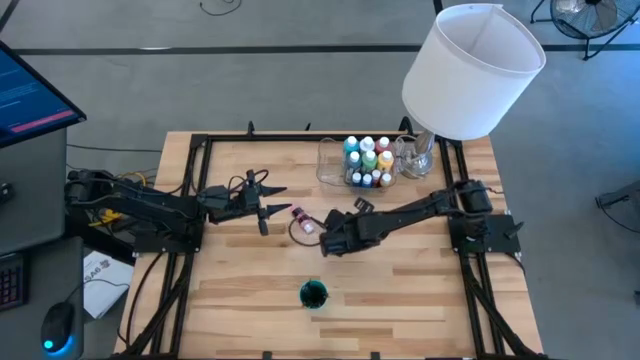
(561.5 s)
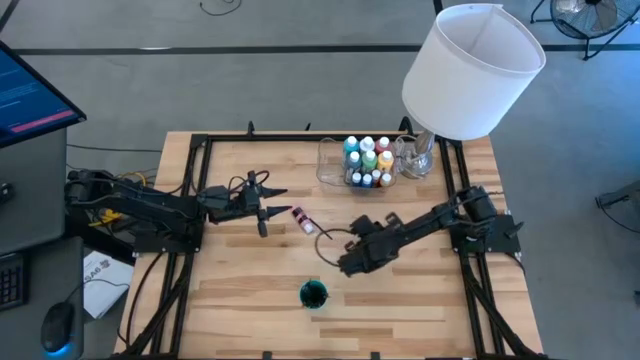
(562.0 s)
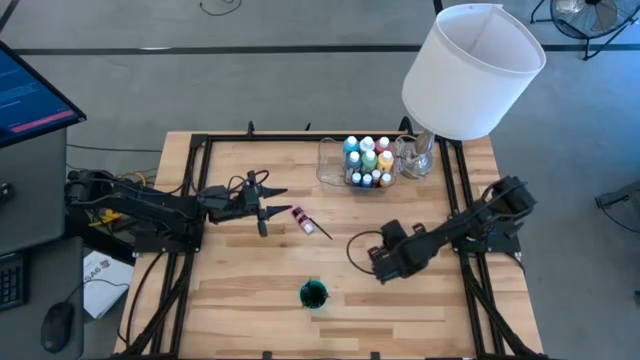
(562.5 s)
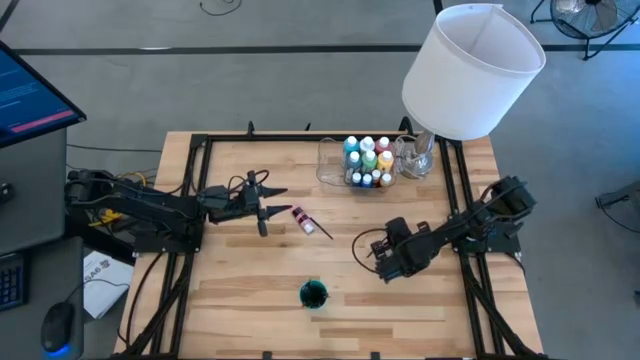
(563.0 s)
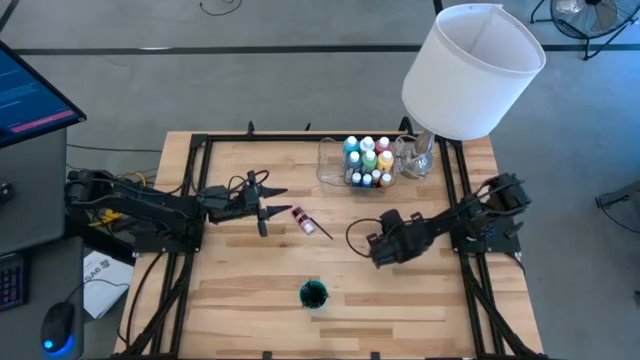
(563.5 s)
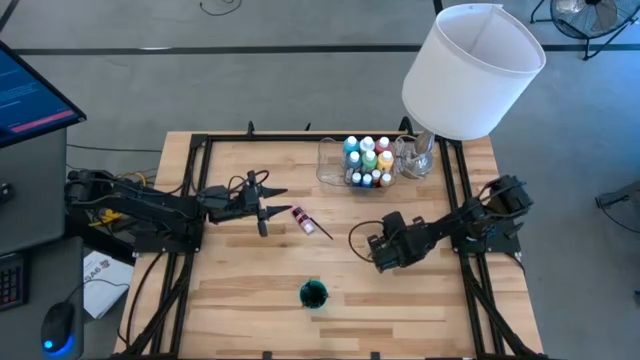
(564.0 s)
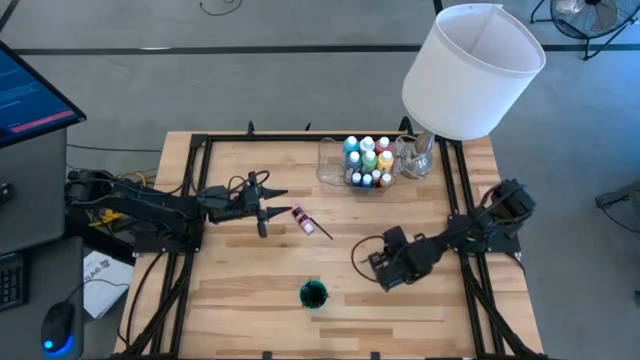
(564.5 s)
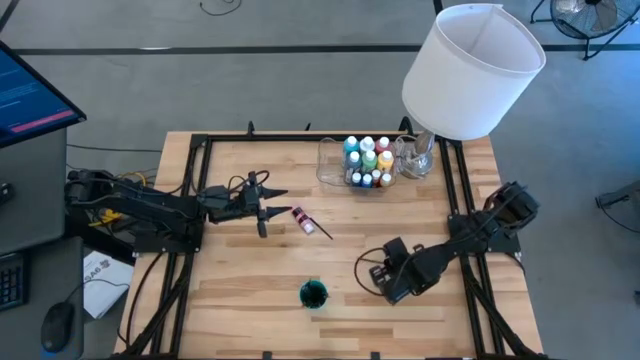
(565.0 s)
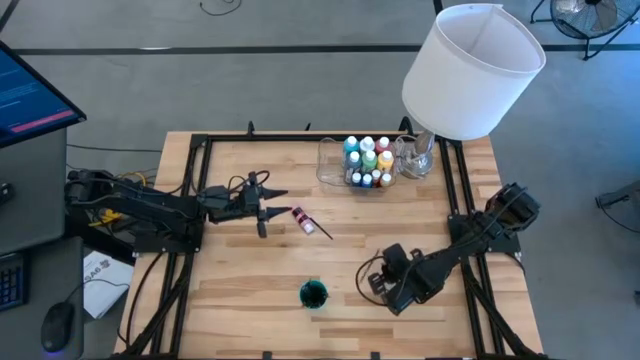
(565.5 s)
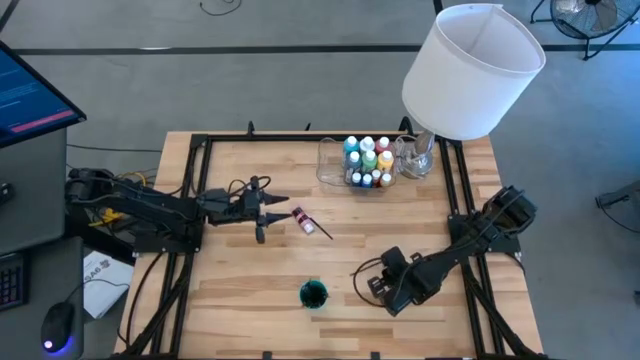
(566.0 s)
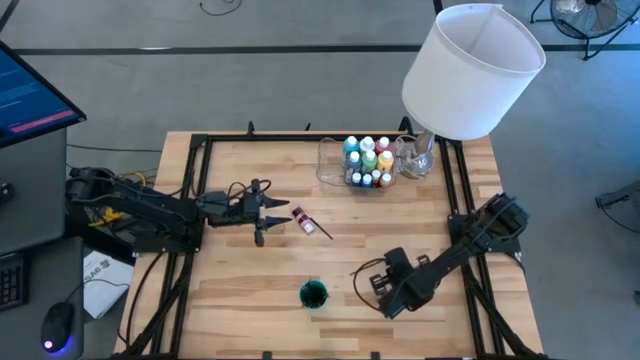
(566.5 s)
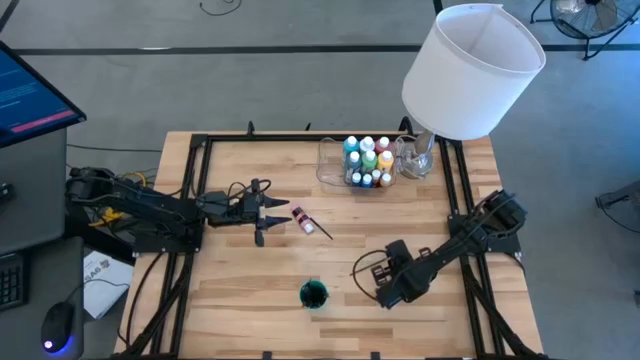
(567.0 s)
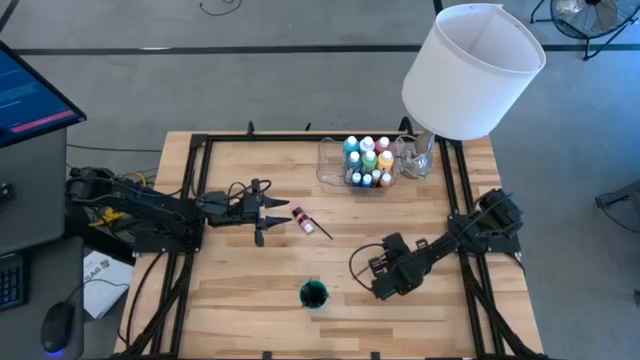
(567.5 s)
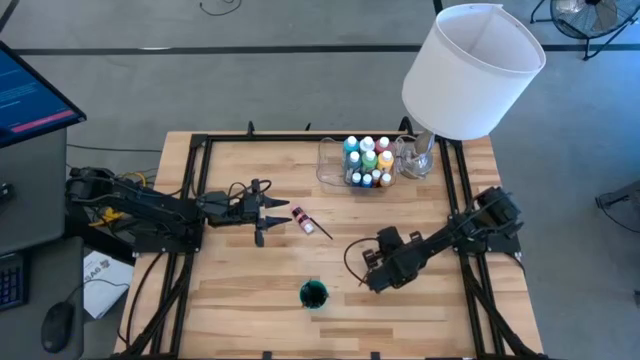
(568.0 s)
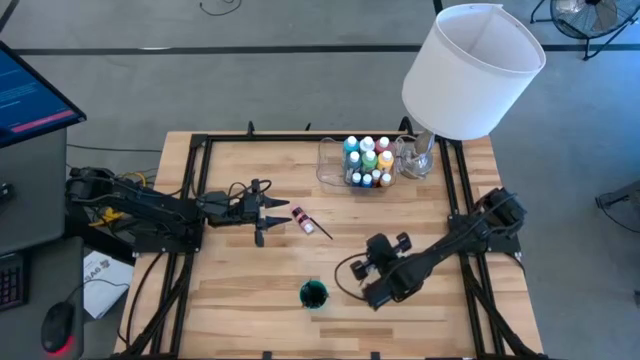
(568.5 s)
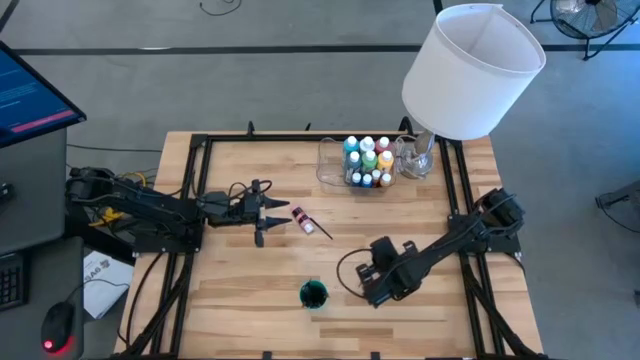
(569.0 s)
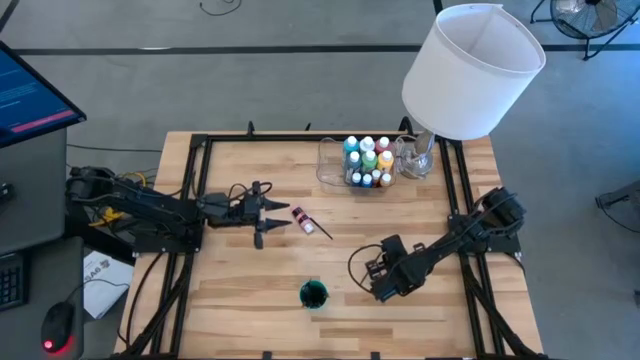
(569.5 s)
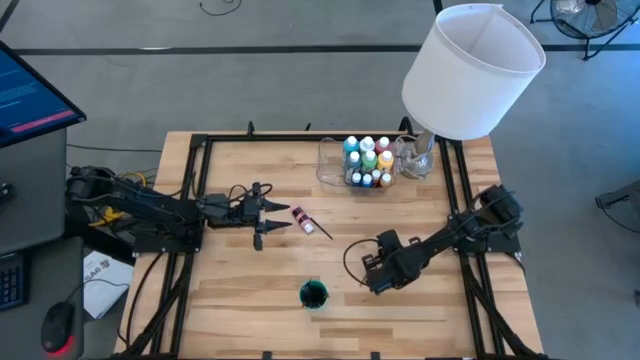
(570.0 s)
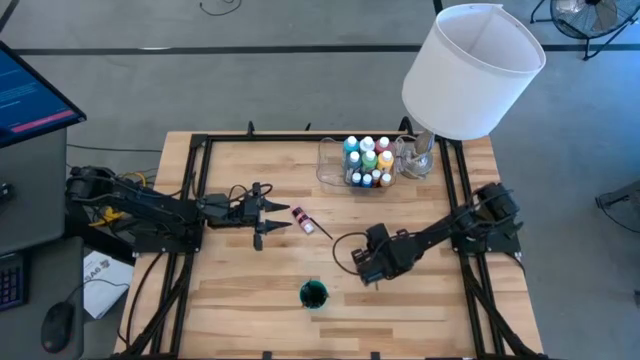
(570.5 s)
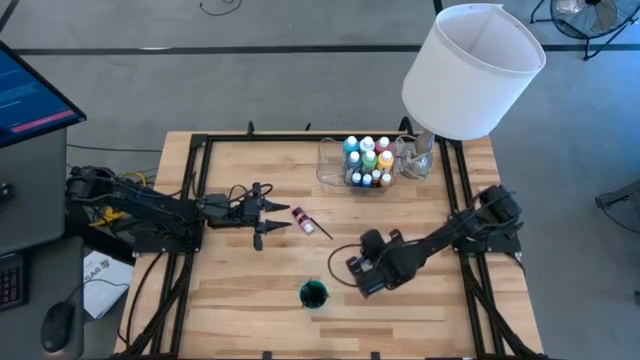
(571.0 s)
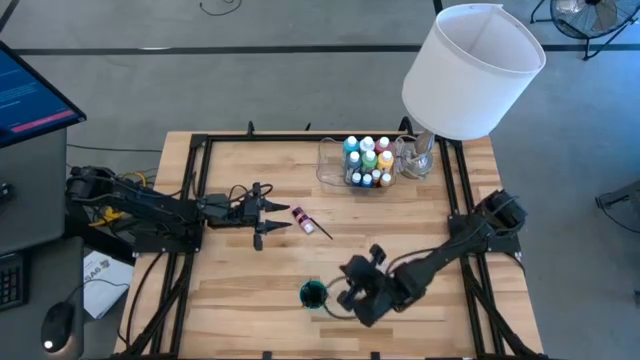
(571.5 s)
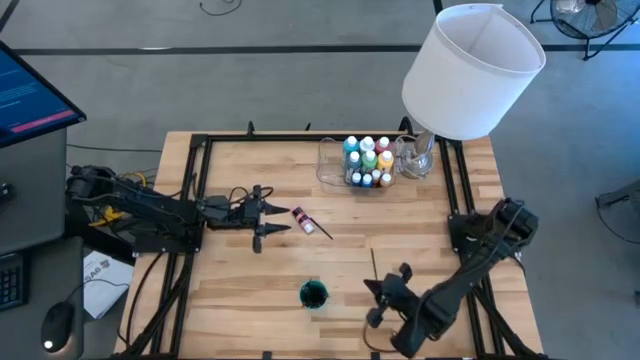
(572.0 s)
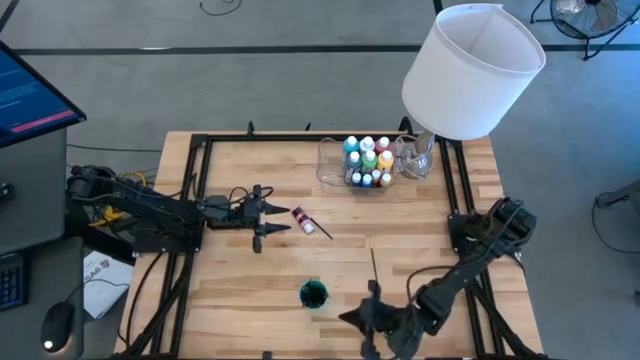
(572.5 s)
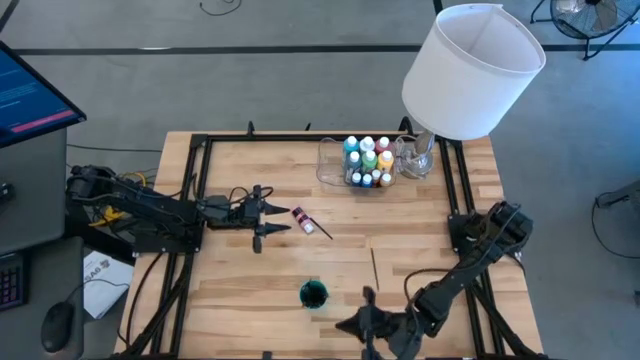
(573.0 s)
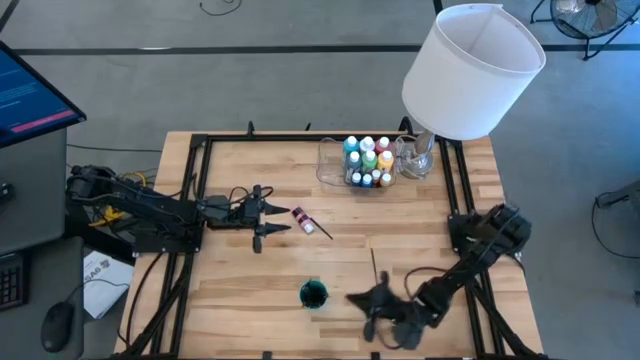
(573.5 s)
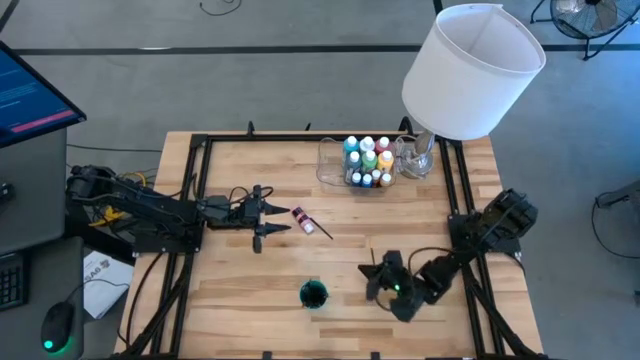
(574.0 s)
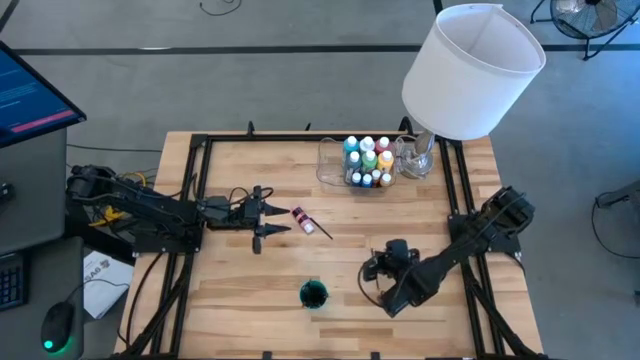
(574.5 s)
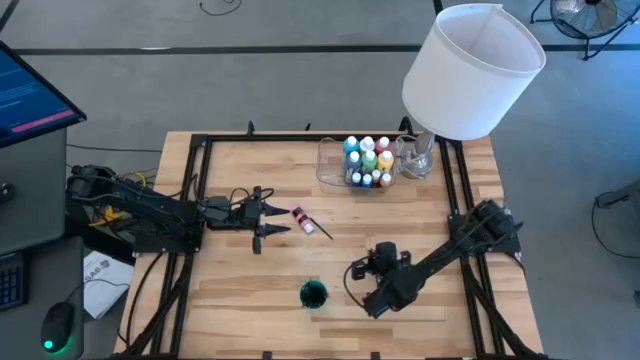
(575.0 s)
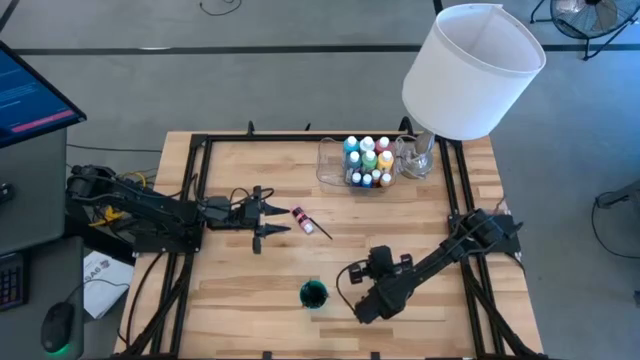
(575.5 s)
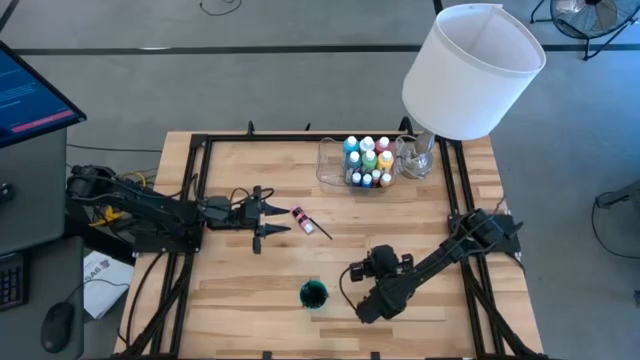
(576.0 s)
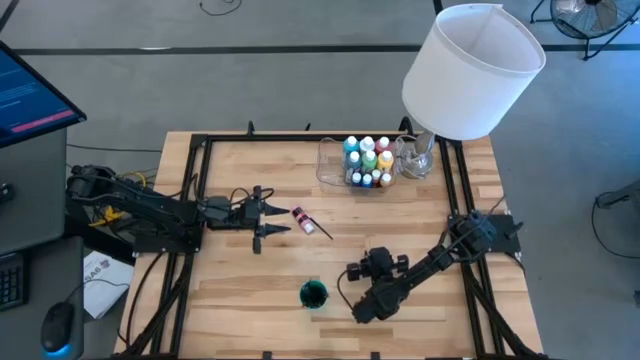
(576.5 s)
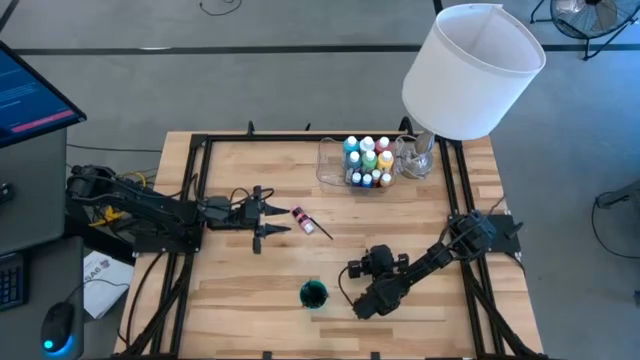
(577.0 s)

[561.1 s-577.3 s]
Task: Pick & Place Paint Supplies
Put the gold paintbrush into the green cup
